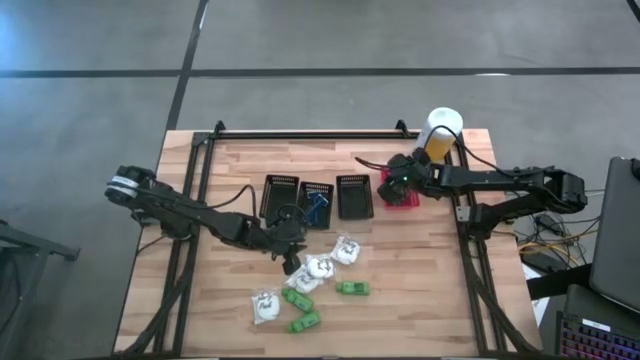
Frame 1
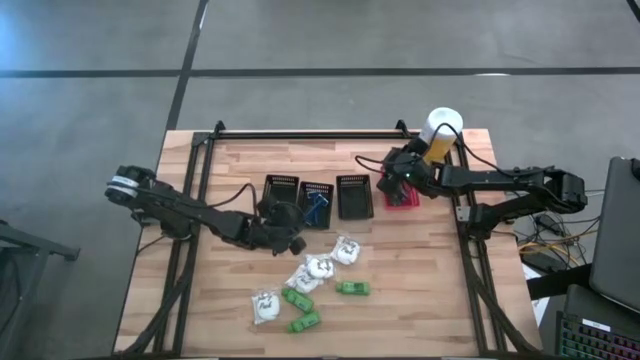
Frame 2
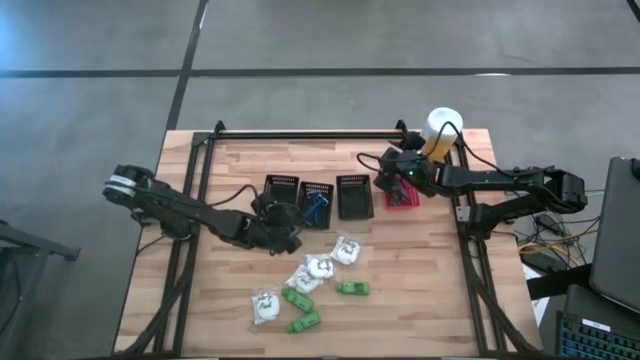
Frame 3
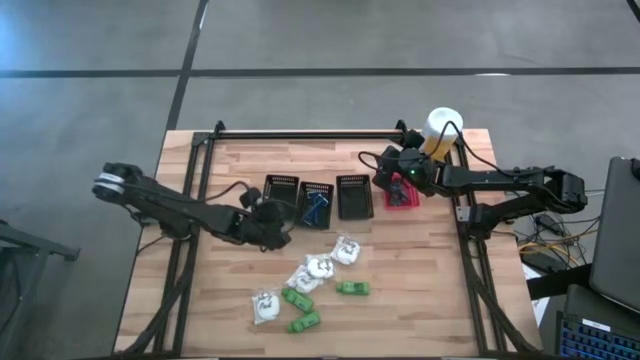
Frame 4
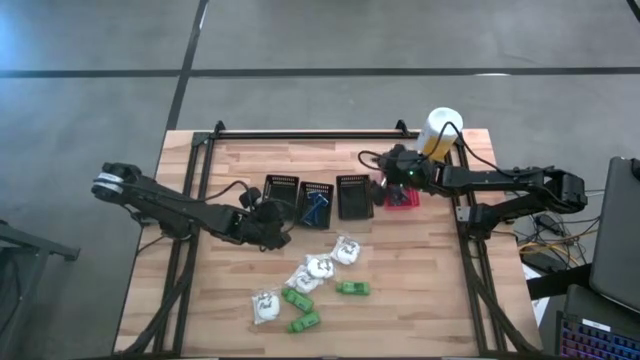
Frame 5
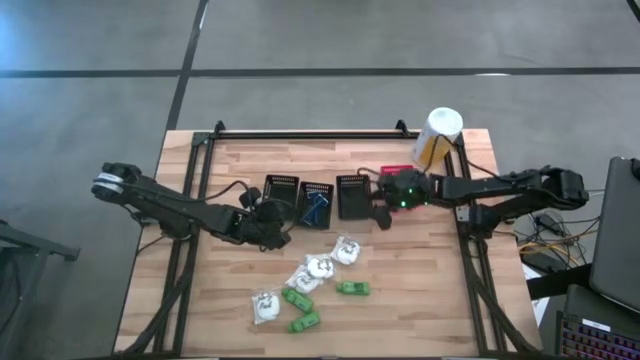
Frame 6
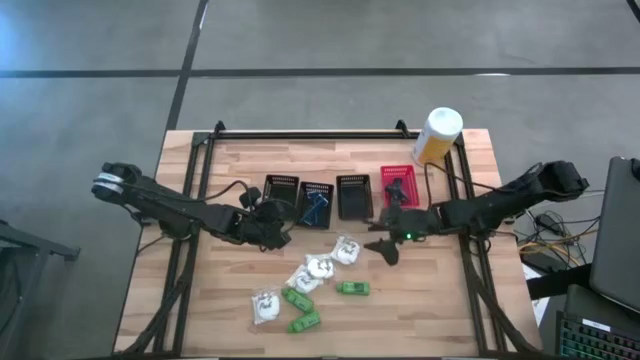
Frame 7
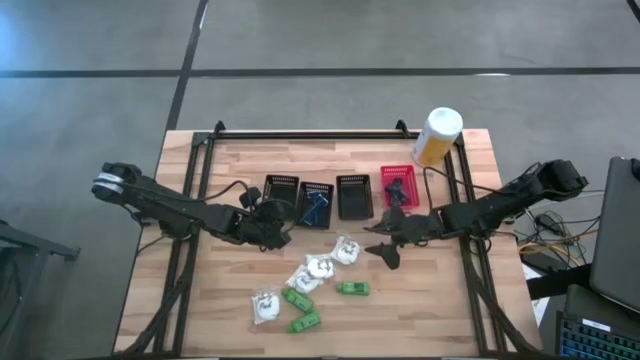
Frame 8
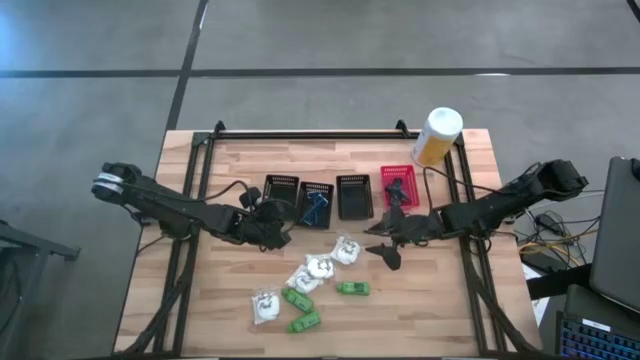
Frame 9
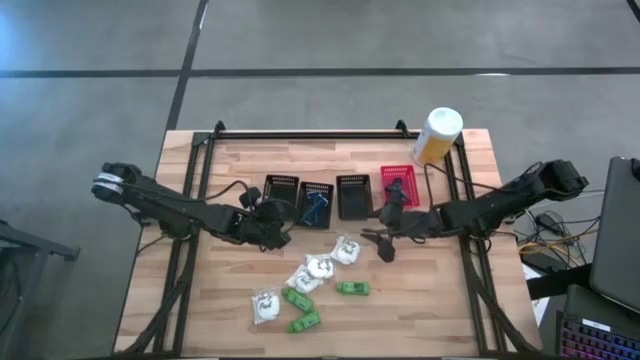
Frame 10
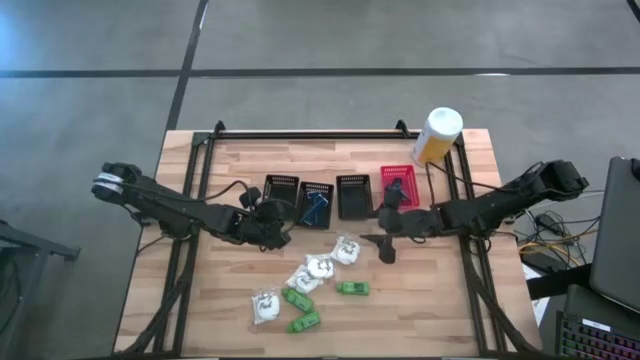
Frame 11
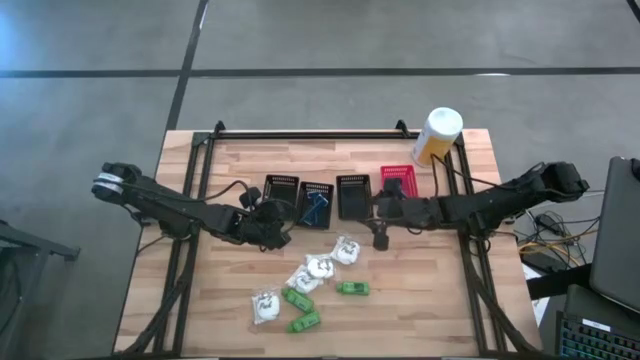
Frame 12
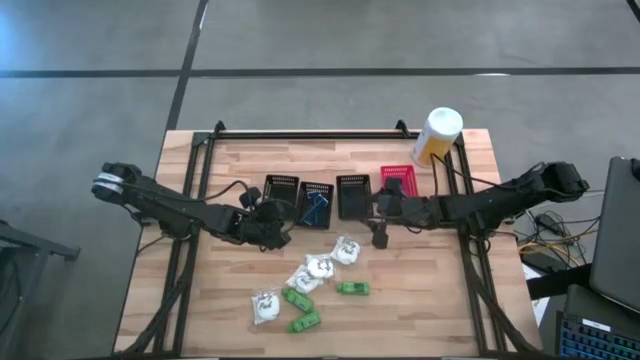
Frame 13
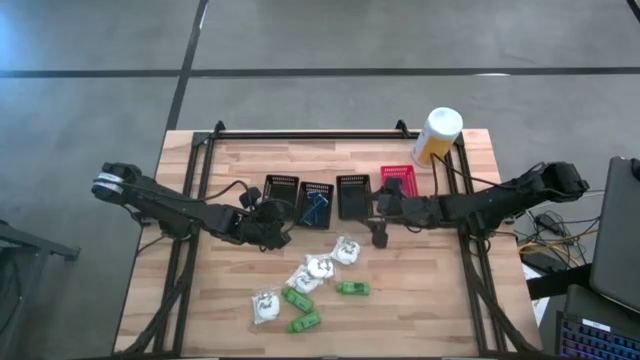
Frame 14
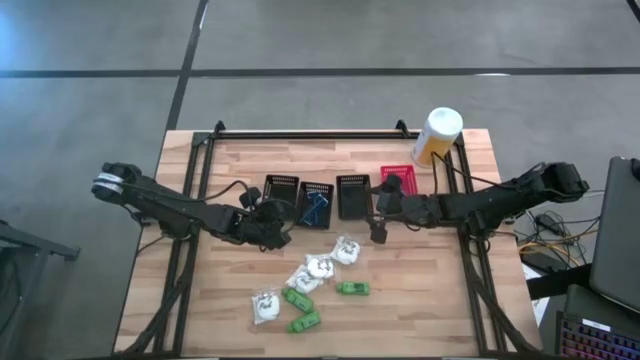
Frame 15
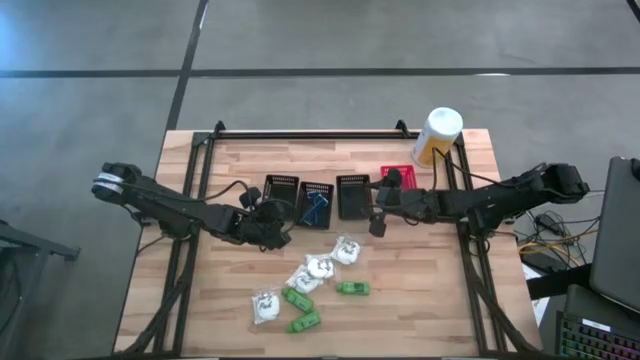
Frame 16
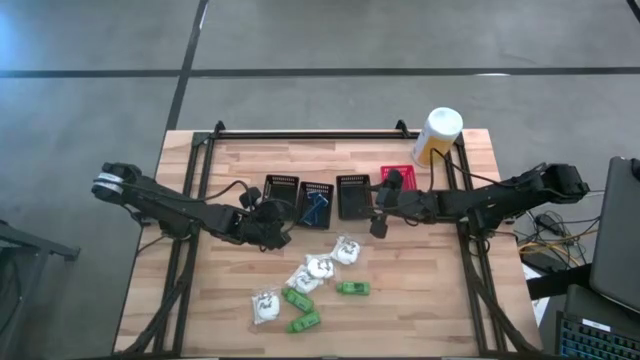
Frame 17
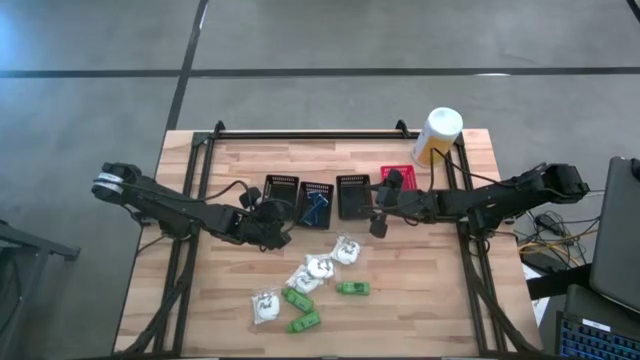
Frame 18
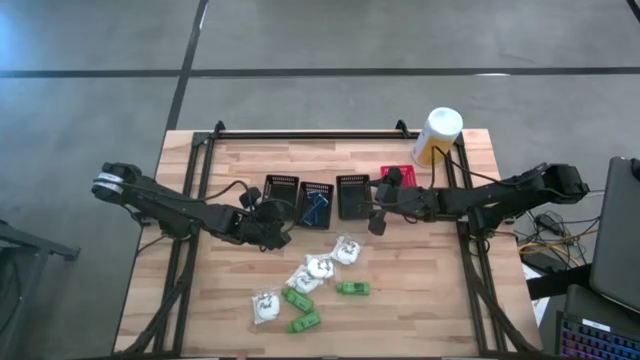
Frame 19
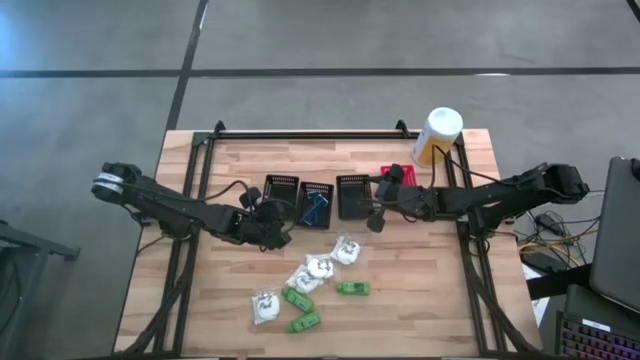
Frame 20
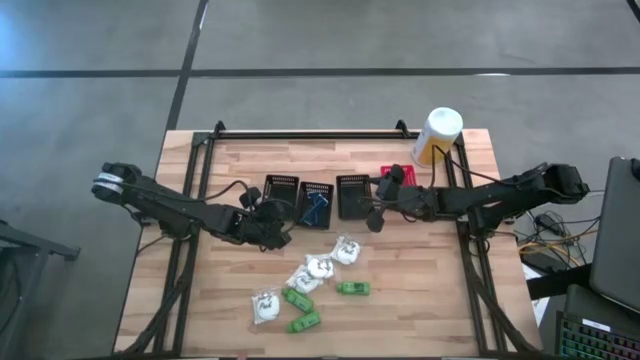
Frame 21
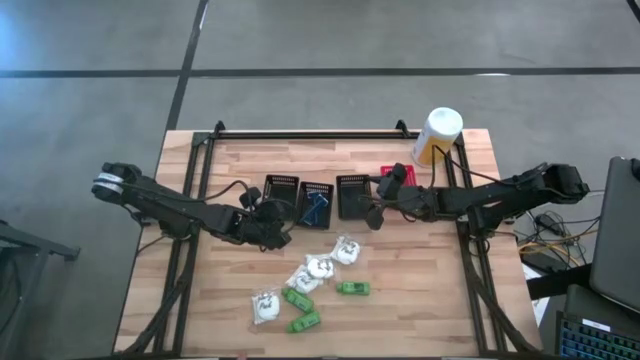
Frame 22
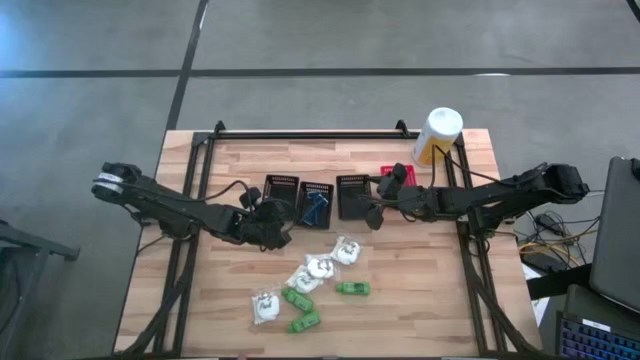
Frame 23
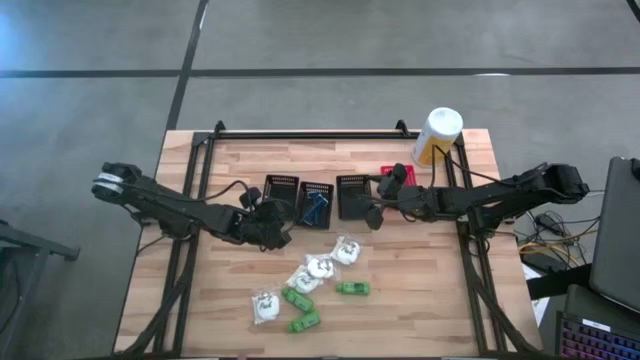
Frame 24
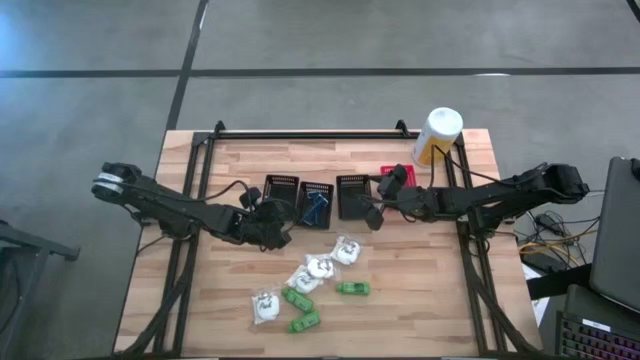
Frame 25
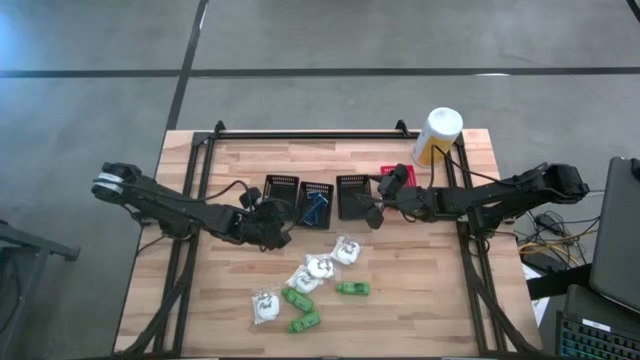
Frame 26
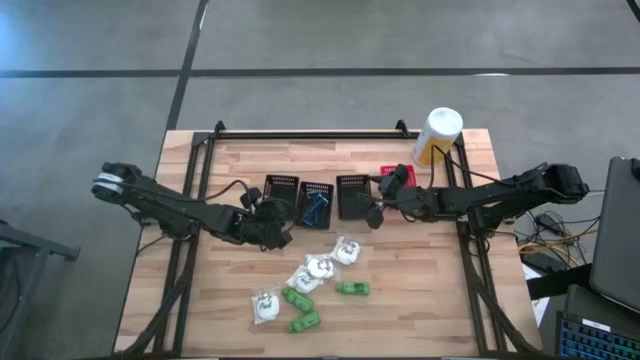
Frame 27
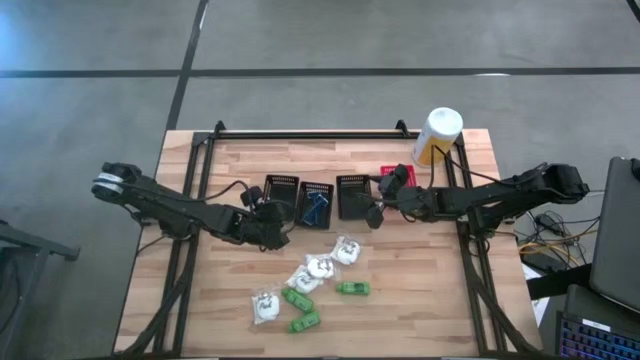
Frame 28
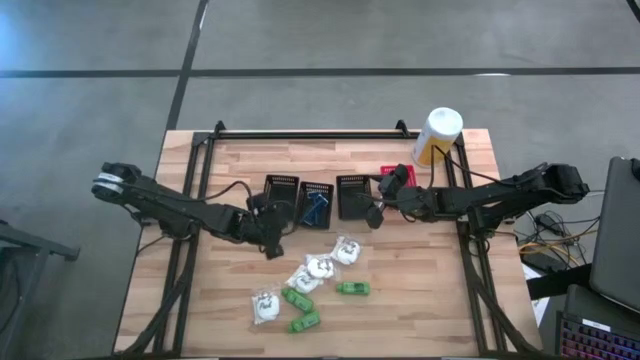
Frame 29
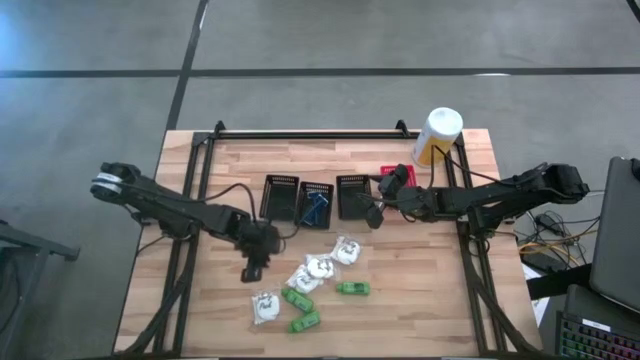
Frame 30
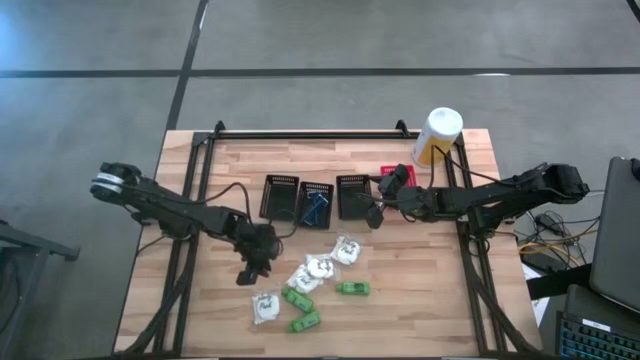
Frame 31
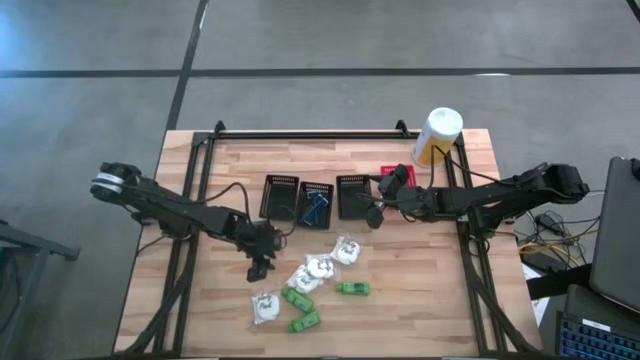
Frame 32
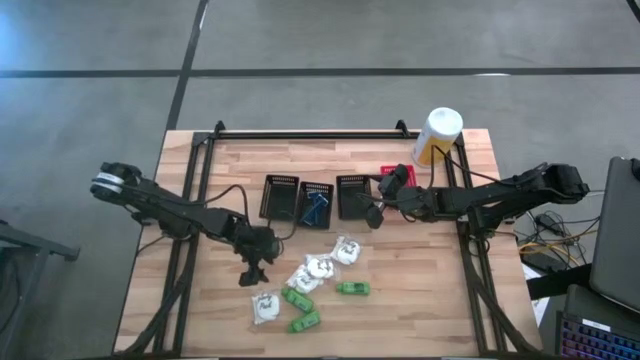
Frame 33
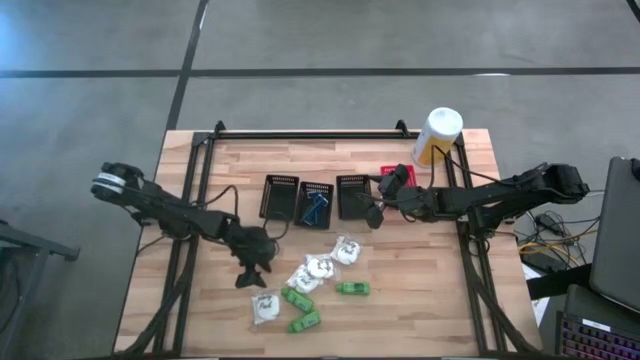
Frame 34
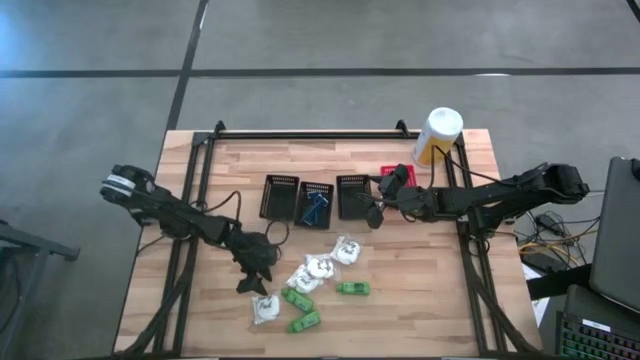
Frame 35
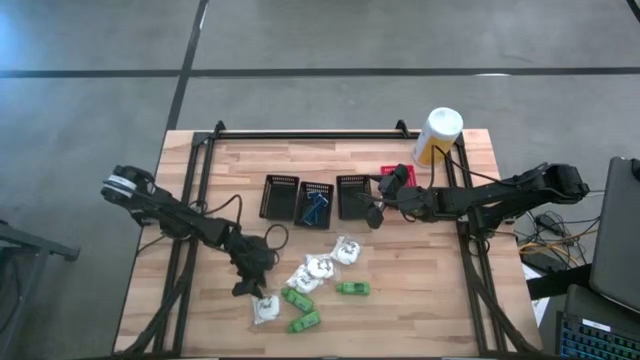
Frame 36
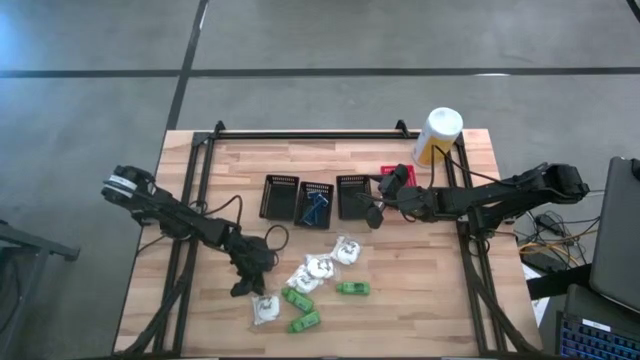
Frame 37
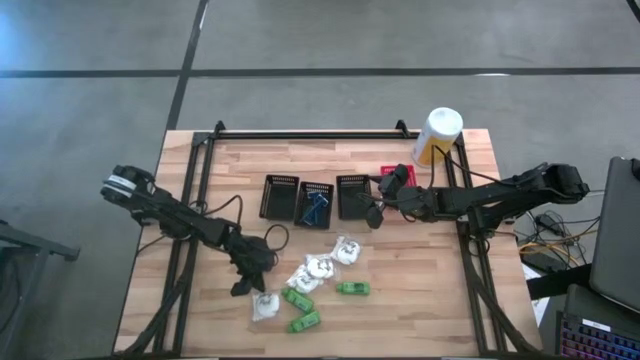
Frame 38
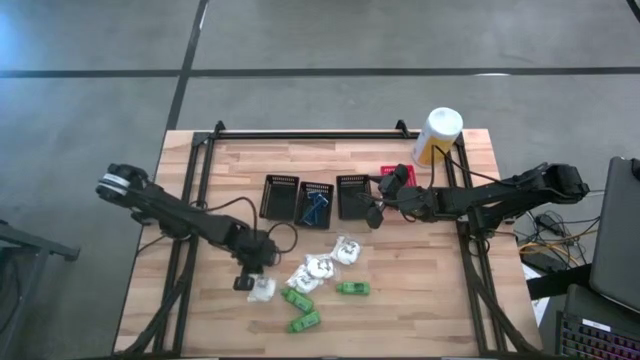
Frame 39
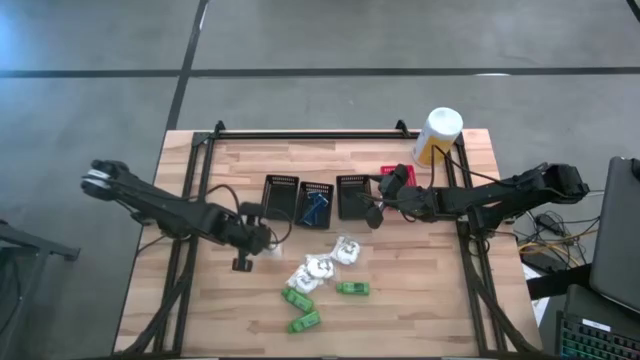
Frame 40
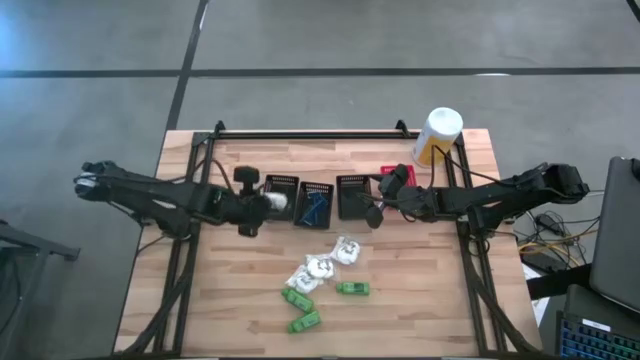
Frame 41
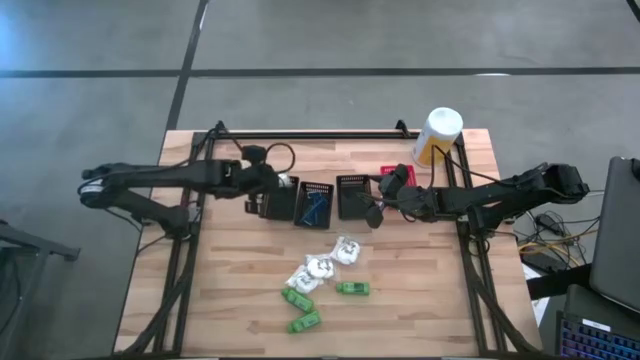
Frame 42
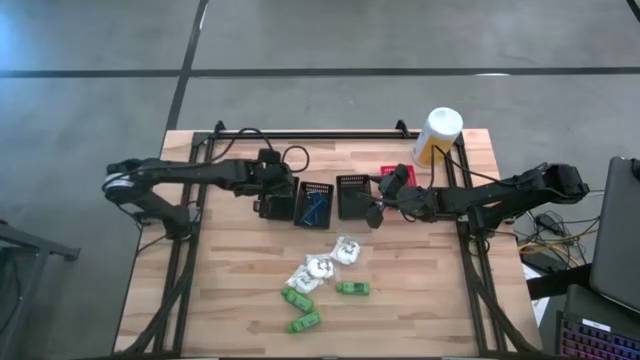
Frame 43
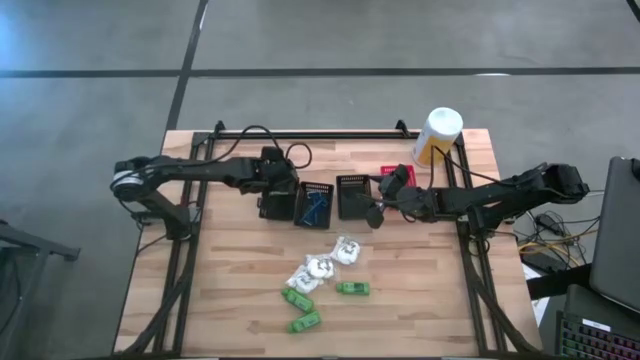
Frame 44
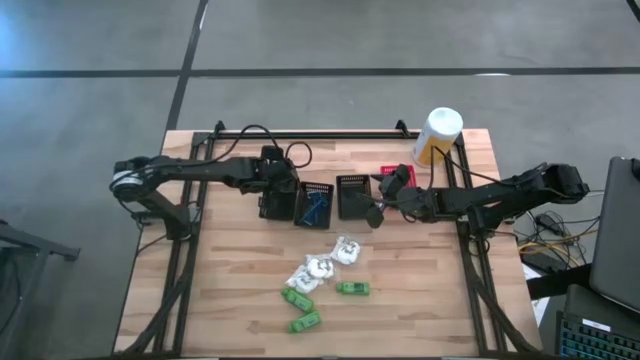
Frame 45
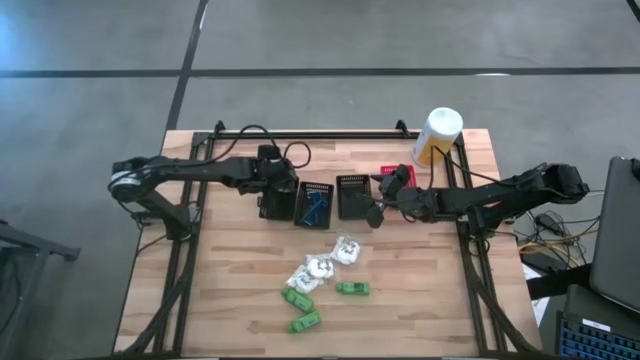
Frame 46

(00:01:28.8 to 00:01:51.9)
Task: Pick & Place Travel size toiletries
Put the bottom left vanity pack into the left black bin
